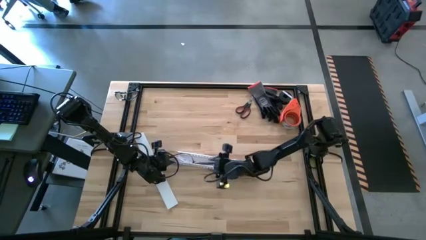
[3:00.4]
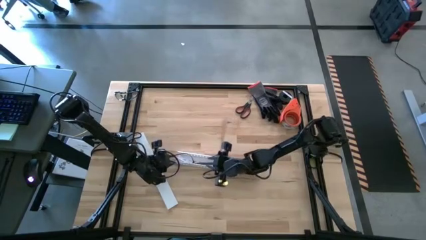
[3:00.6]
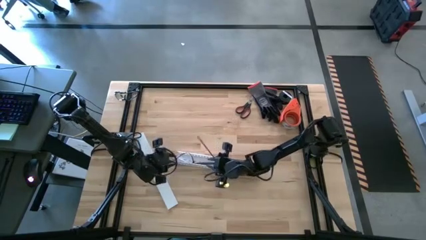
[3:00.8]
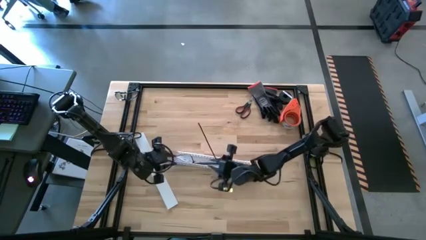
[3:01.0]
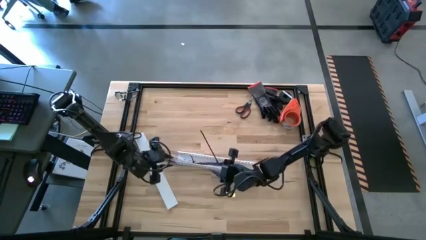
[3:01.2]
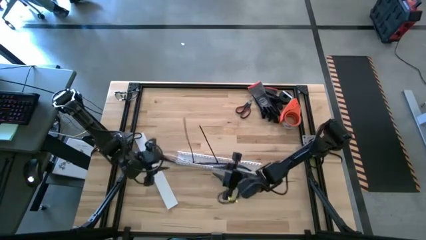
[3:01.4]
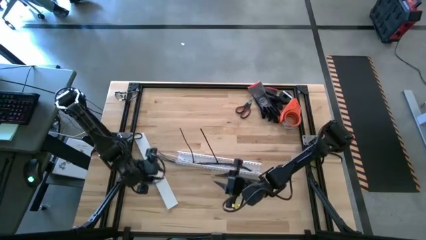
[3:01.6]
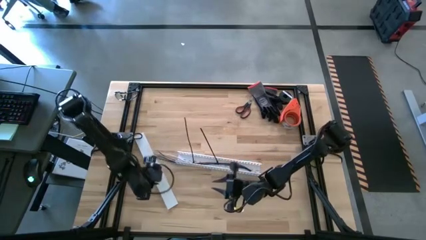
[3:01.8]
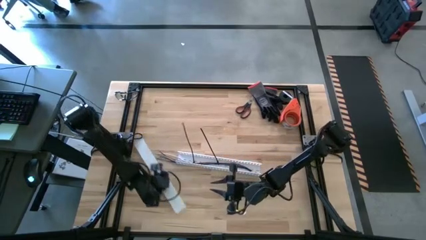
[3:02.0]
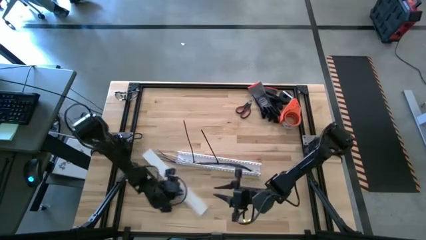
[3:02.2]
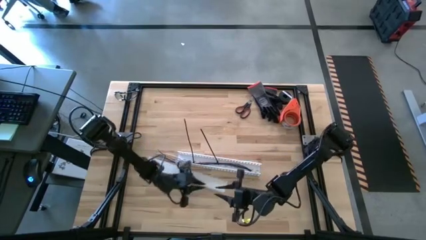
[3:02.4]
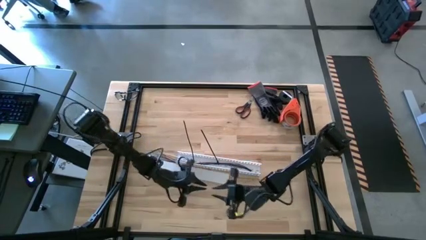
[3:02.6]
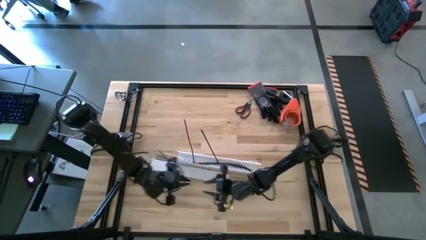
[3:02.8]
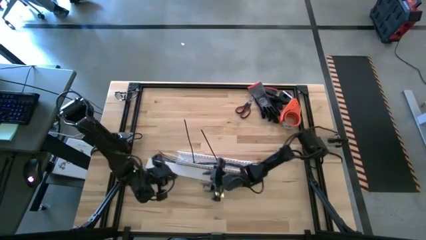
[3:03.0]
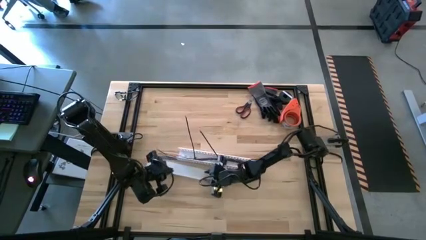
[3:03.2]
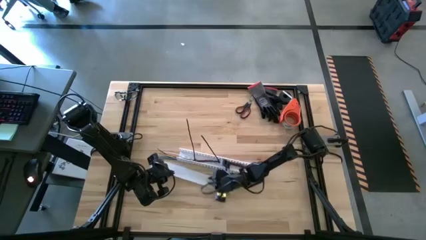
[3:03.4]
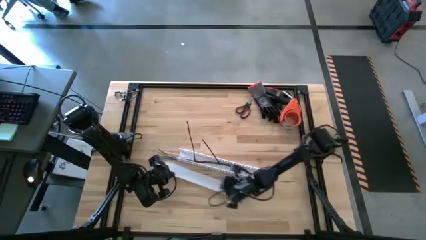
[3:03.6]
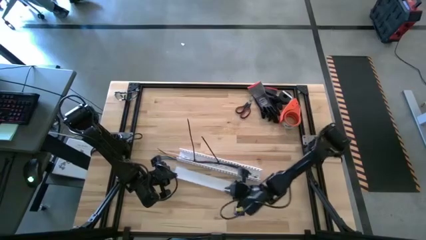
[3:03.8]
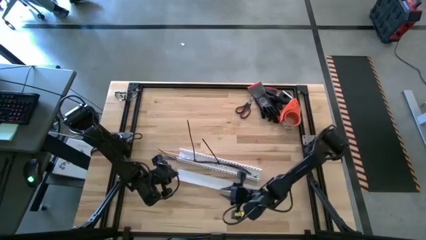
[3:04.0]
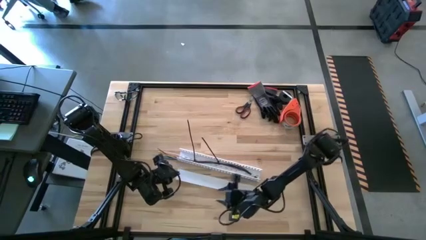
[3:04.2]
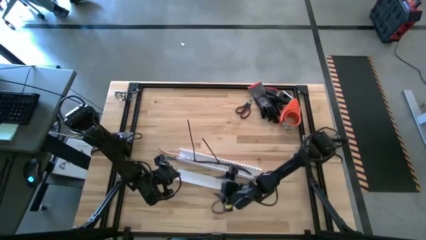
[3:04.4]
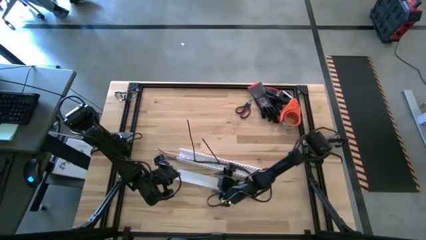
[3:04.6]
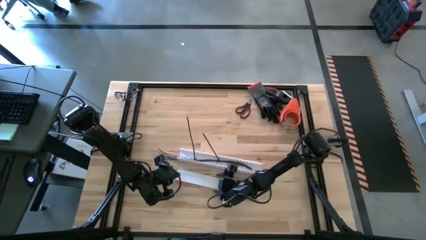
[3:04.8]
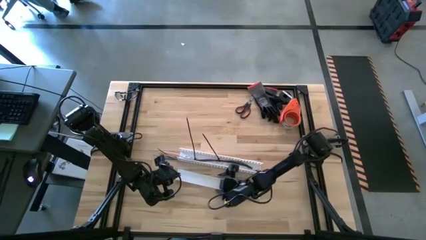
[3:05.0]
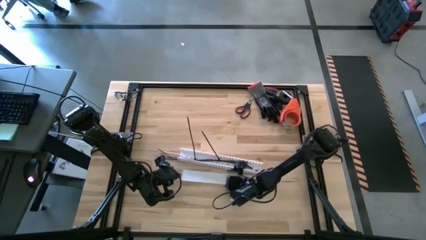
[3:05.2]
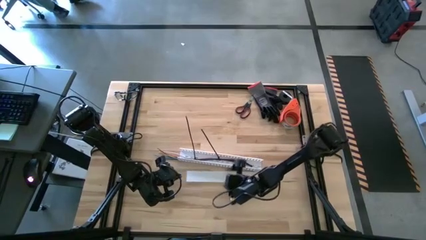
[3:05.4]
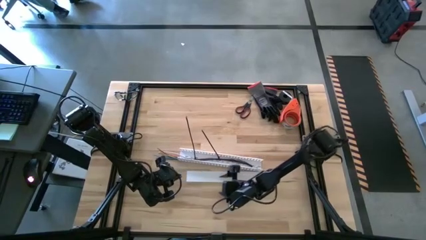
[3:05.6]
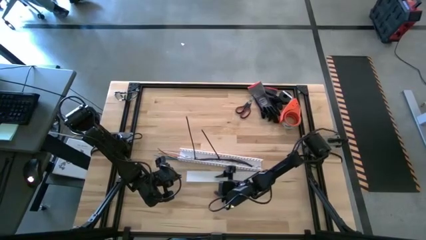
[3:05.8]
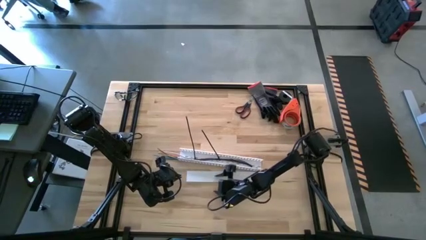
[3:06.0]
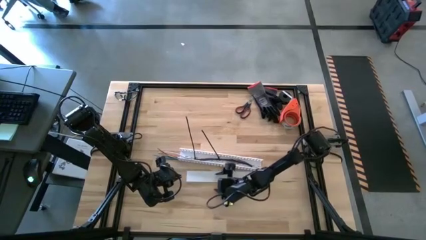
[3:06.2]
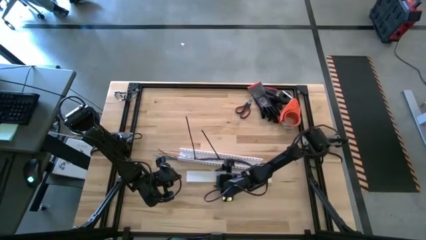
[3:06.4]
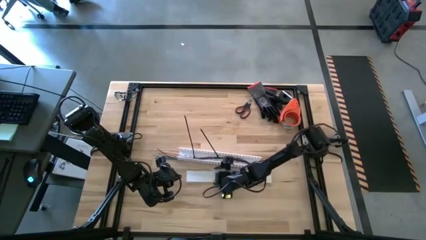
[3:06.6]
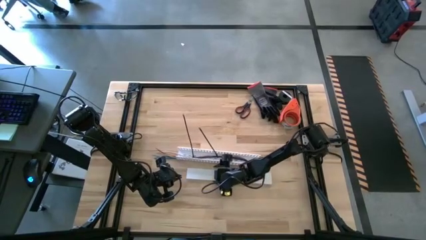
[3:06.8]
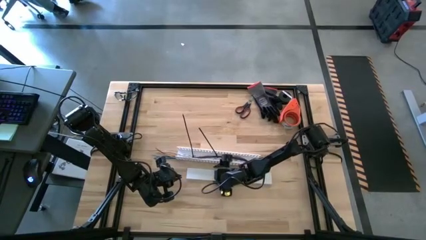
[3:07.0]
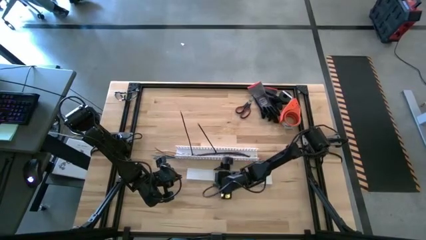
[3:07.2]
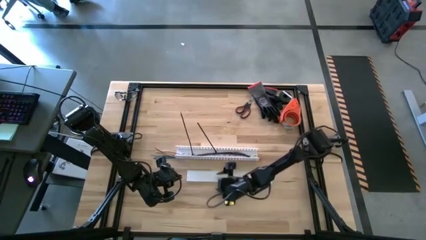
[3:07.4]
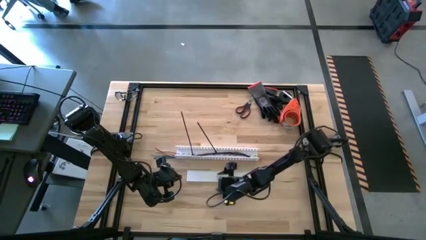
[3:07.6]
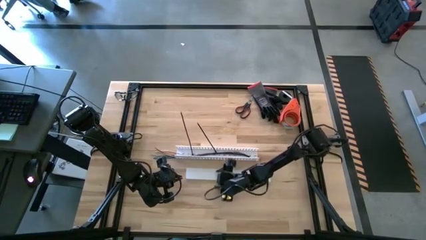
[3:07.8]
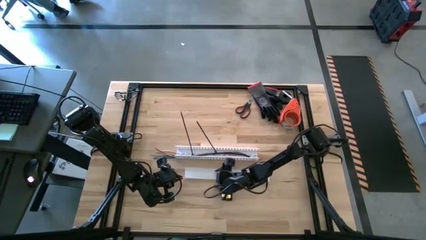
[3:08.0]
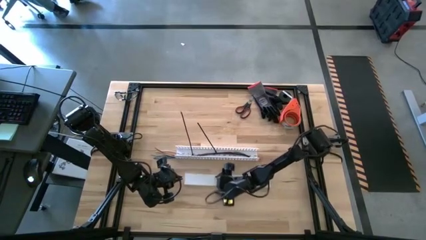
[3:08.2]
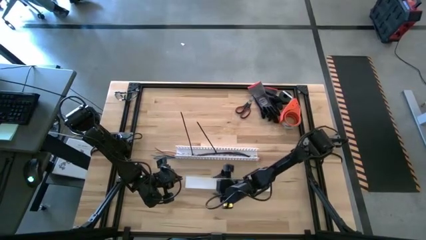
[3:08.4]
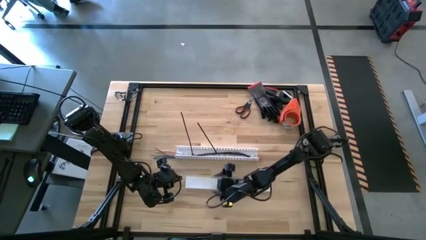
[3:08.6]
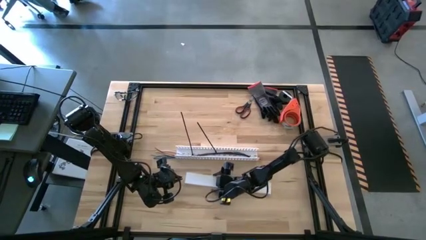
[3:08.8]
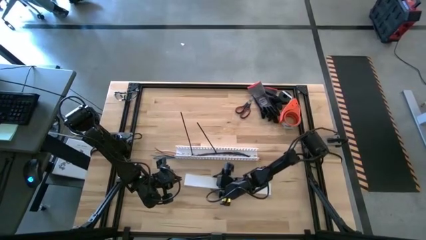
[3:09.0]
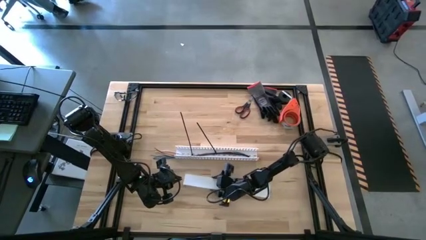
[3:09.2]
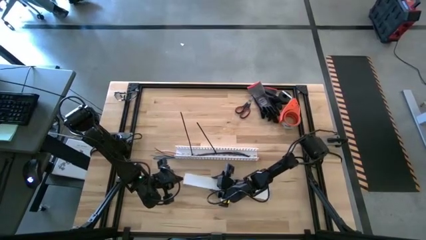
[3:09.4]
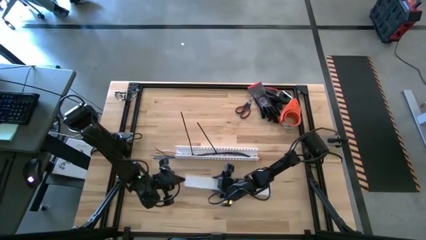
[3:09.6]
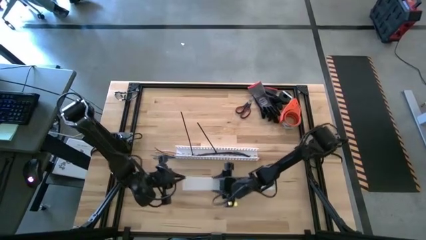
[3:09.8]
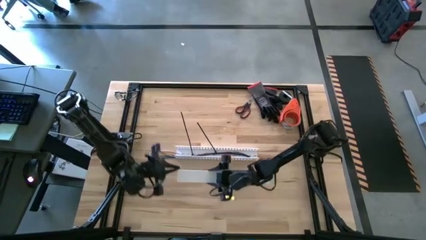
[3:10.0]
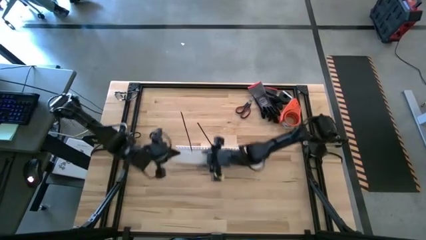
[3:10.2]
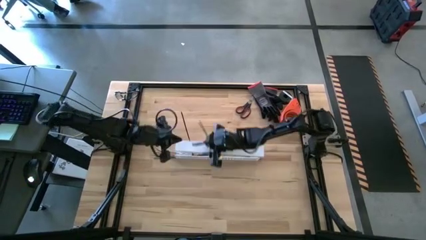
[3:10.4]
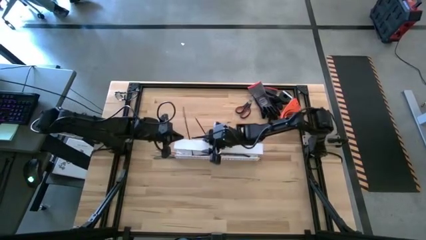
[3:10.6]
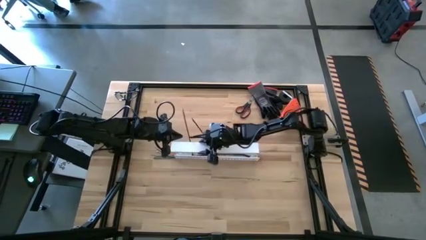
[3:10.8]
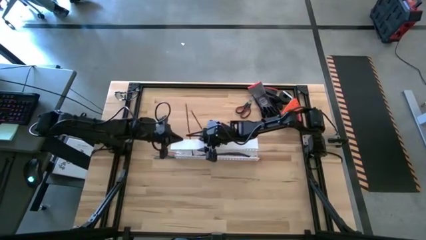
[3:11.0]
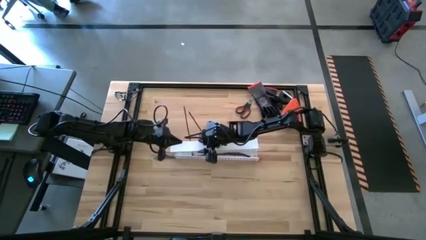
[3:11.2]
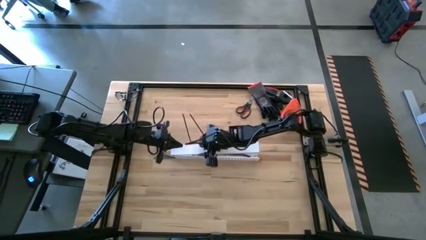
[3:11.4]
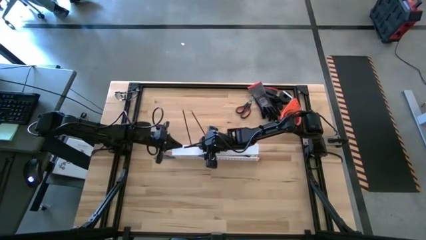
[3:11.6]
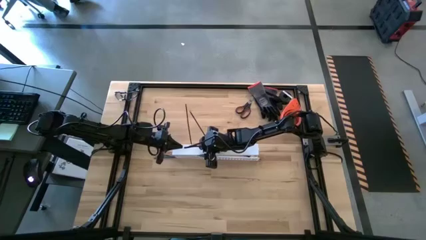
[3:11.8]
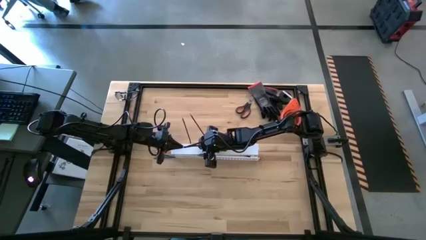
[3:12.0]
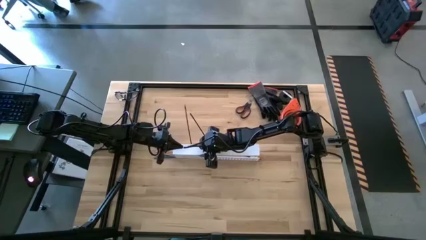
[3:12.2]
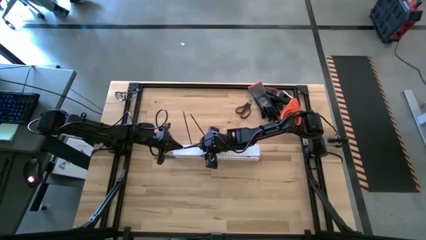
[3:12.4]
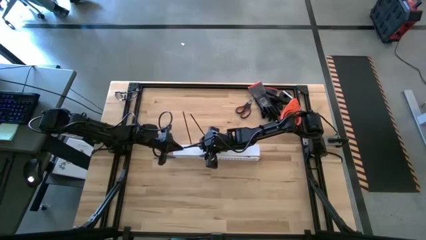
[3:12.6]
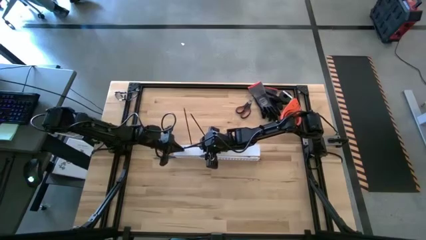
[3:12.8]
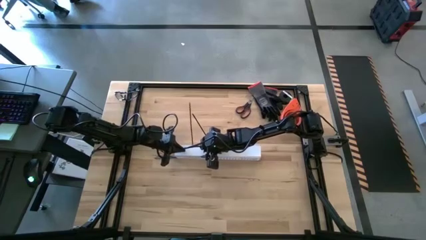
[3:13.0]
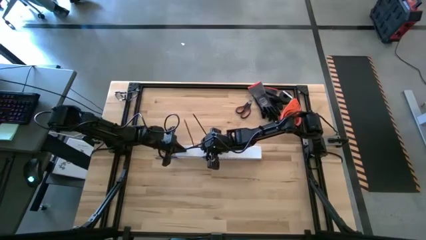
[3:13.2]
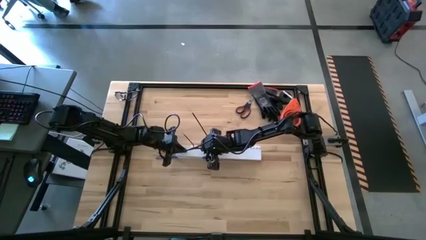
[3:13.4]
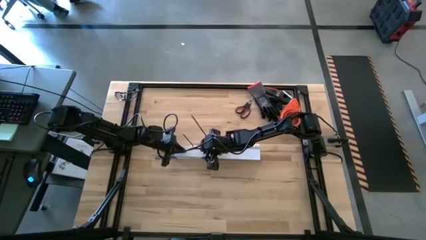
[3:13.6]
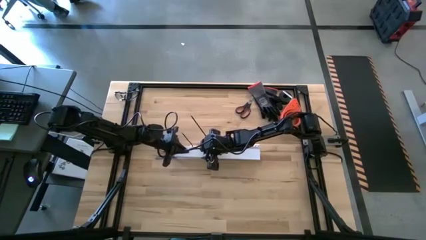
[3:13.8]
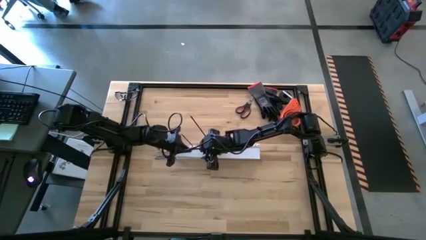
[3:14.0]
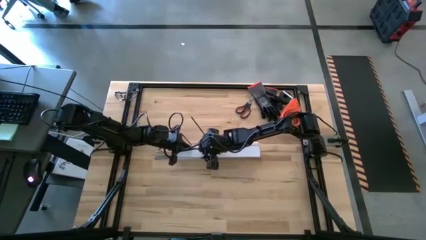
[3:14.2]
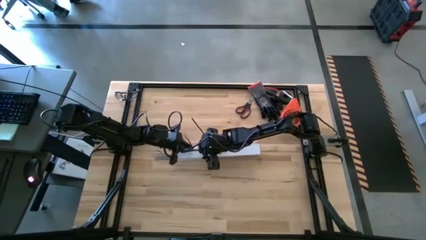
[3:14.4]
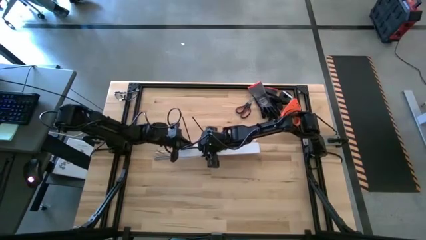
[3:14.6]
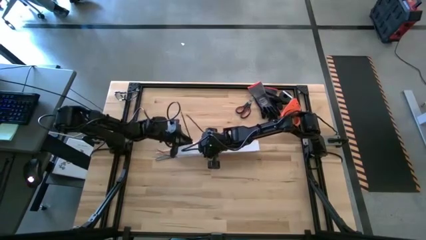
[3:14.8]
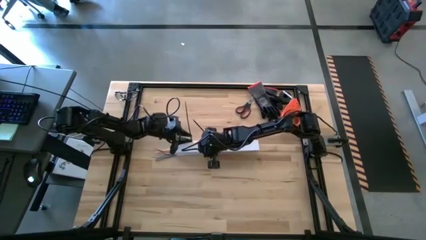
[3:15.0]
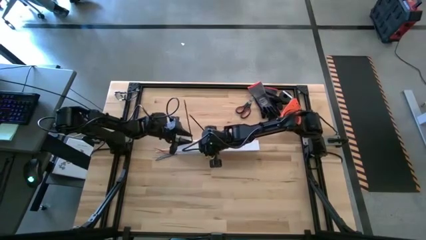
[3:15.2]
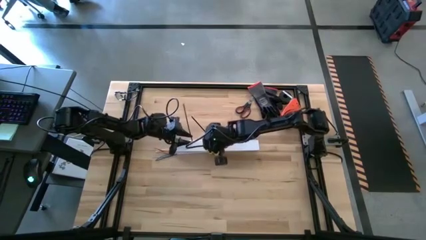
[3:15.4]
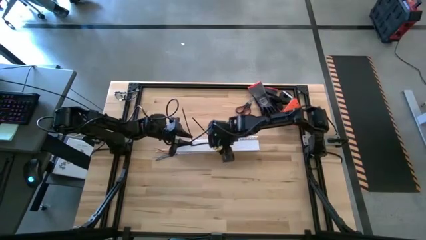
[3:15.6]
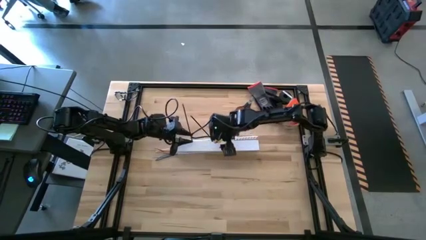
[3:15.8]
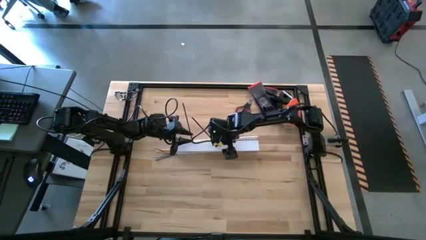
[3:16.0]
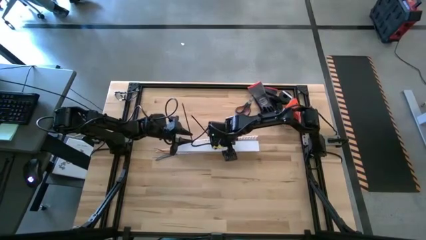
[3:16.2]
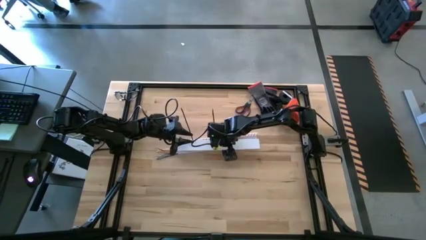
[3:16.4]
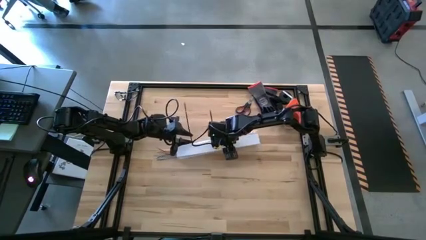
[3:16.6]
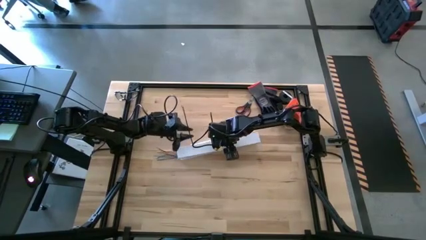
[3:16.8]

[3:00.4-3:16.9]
Task: Ziptie cables
Close the white cable duct
